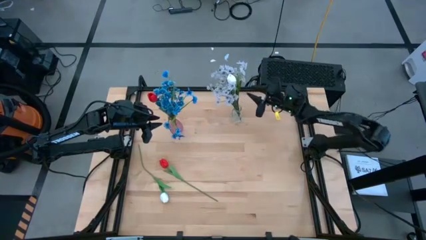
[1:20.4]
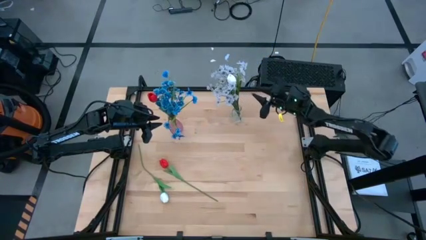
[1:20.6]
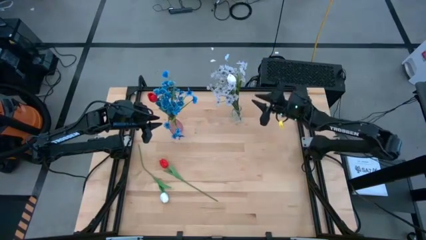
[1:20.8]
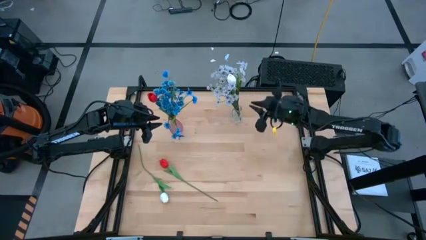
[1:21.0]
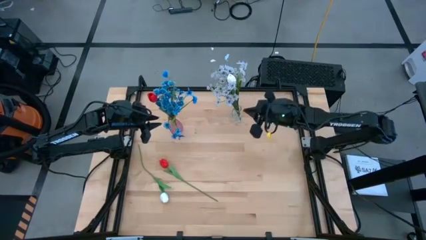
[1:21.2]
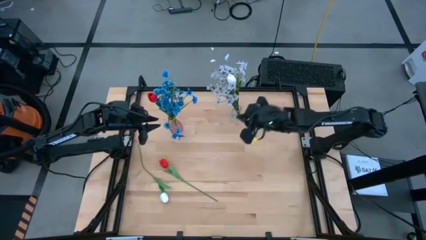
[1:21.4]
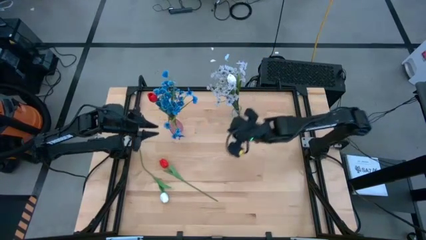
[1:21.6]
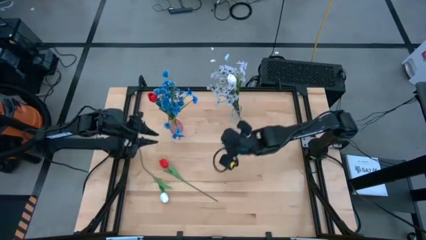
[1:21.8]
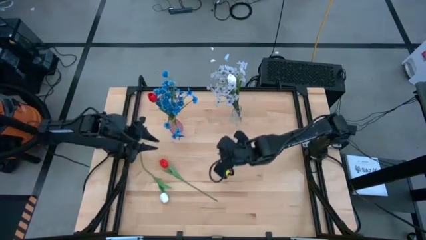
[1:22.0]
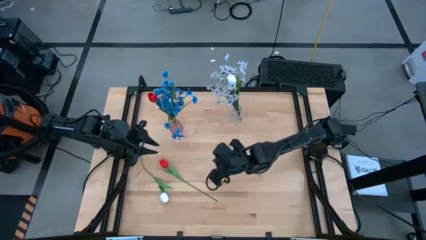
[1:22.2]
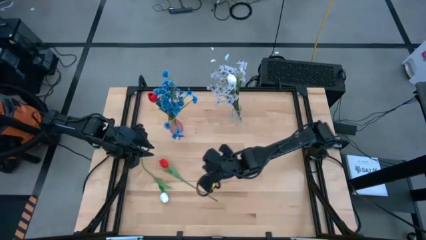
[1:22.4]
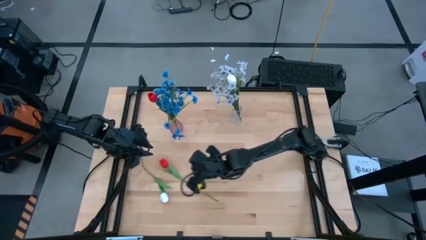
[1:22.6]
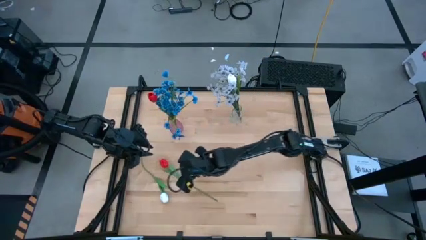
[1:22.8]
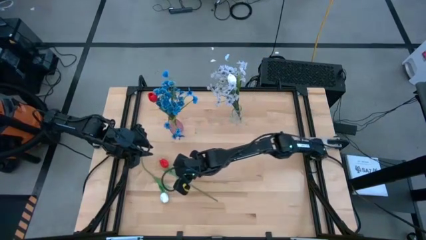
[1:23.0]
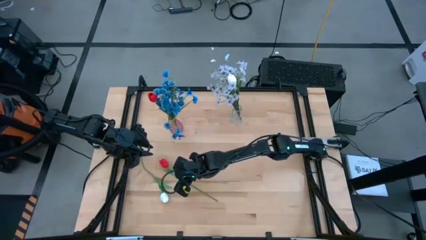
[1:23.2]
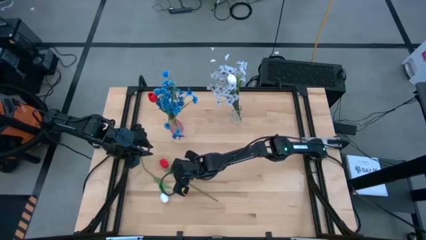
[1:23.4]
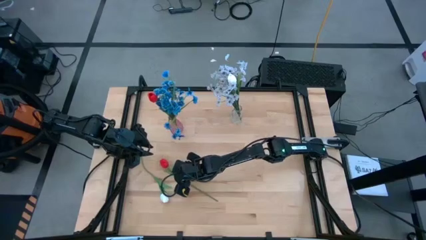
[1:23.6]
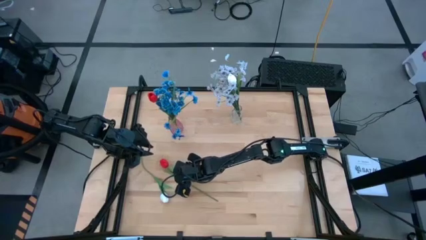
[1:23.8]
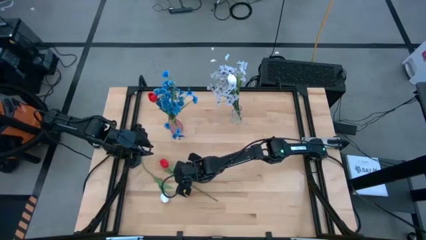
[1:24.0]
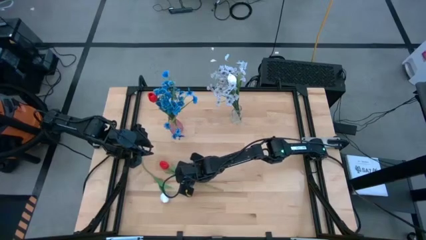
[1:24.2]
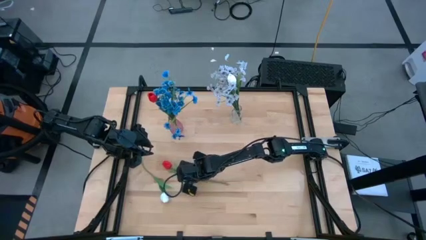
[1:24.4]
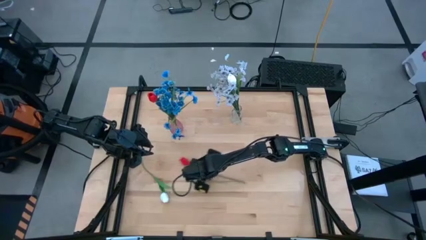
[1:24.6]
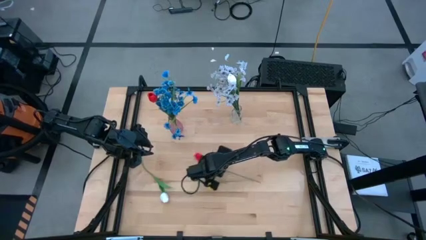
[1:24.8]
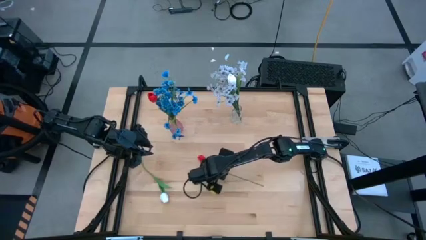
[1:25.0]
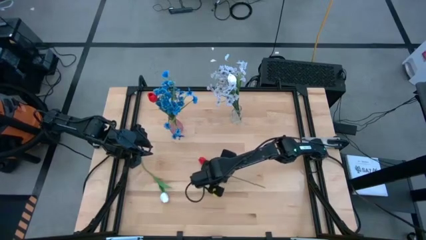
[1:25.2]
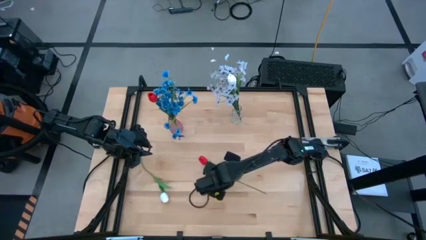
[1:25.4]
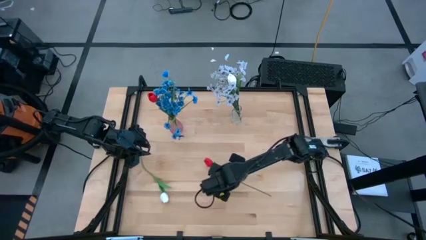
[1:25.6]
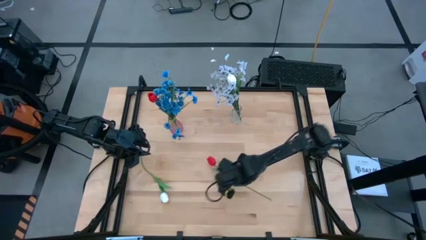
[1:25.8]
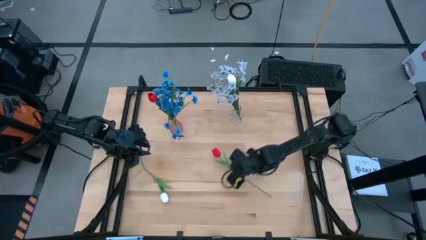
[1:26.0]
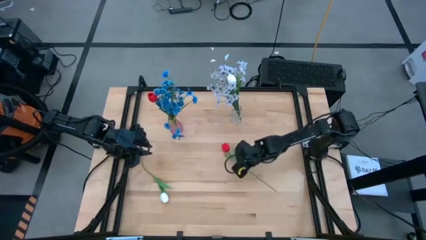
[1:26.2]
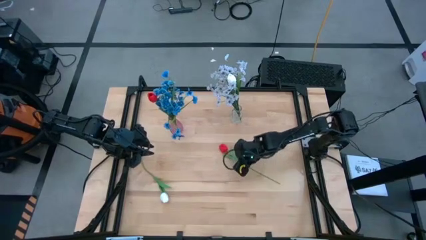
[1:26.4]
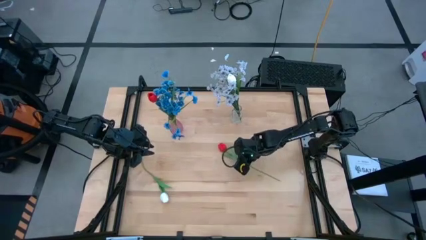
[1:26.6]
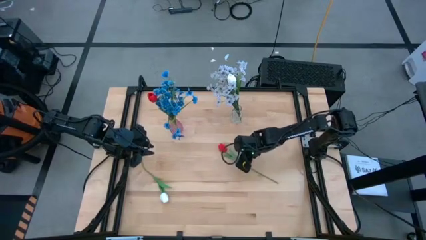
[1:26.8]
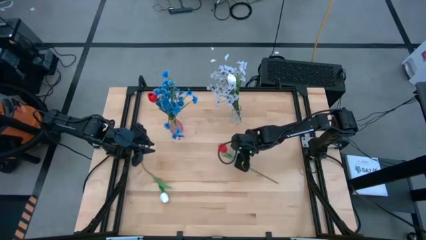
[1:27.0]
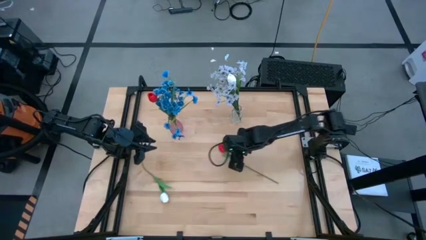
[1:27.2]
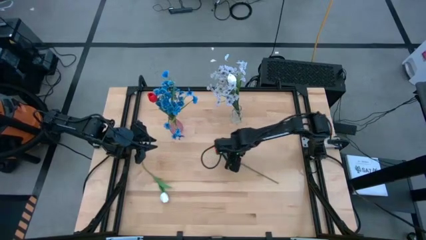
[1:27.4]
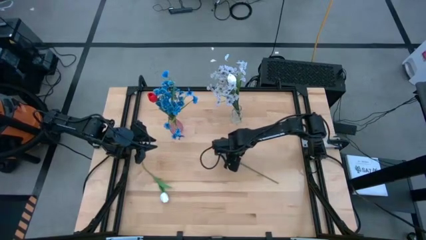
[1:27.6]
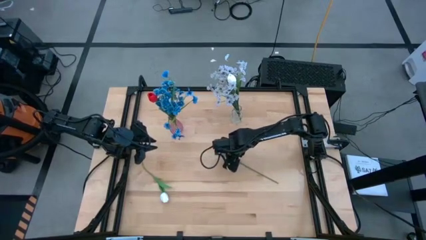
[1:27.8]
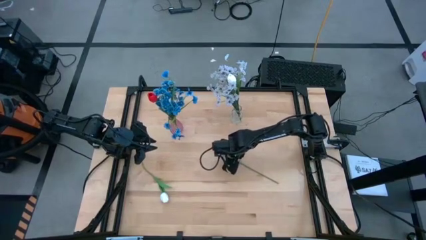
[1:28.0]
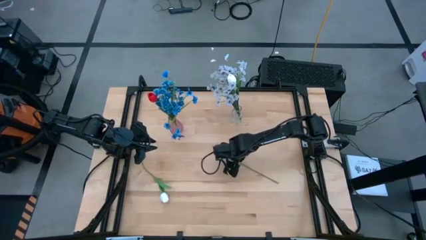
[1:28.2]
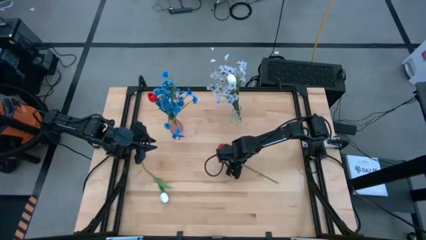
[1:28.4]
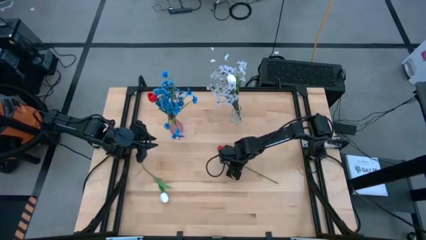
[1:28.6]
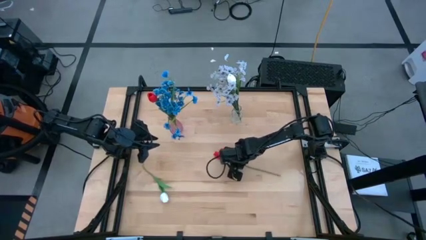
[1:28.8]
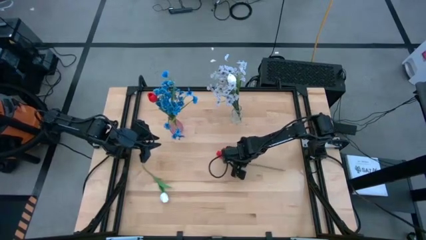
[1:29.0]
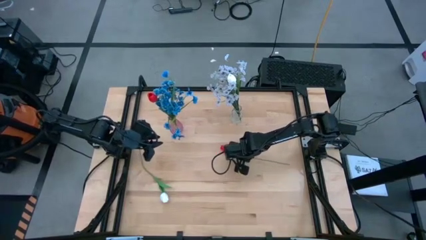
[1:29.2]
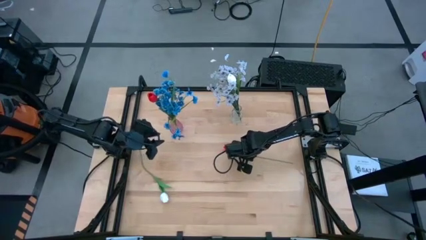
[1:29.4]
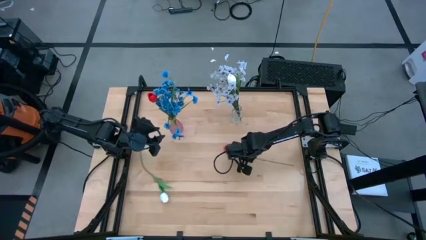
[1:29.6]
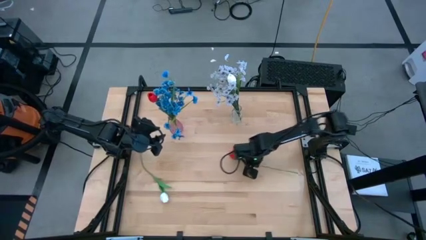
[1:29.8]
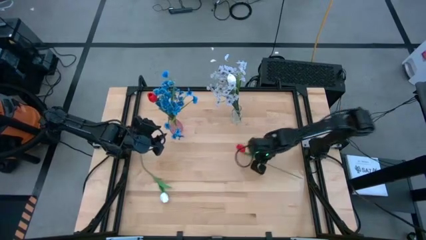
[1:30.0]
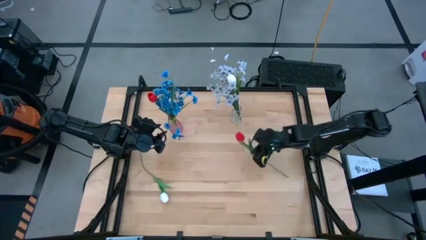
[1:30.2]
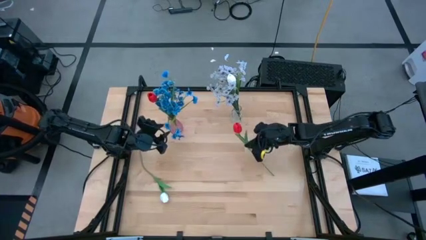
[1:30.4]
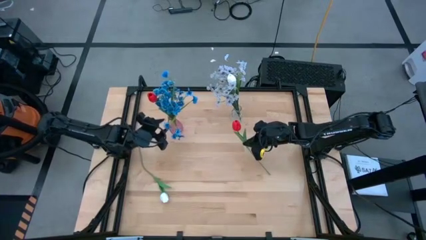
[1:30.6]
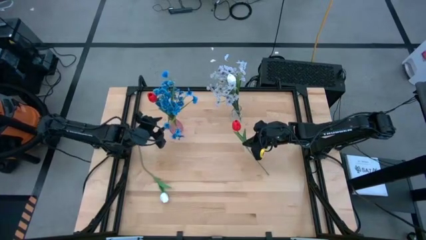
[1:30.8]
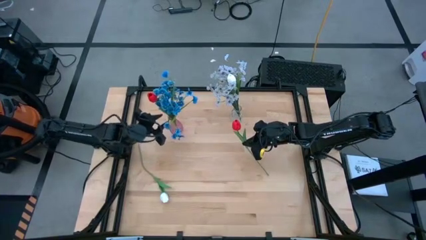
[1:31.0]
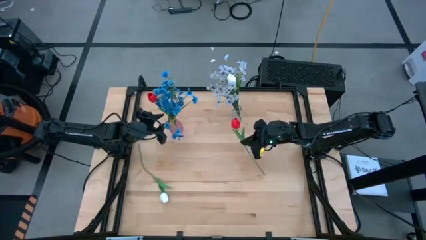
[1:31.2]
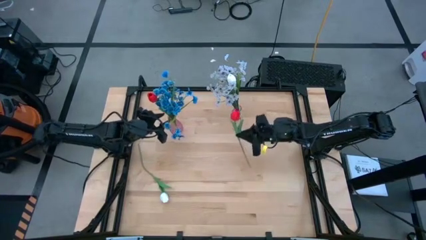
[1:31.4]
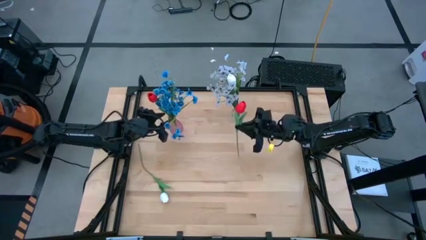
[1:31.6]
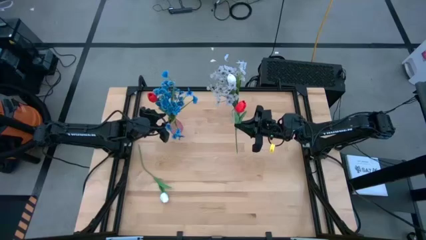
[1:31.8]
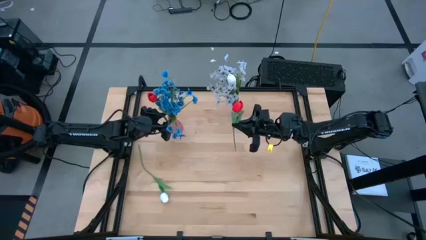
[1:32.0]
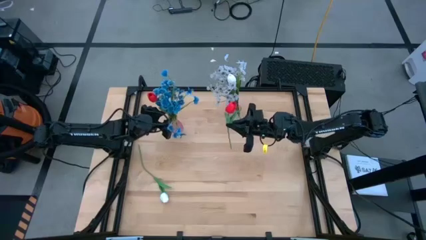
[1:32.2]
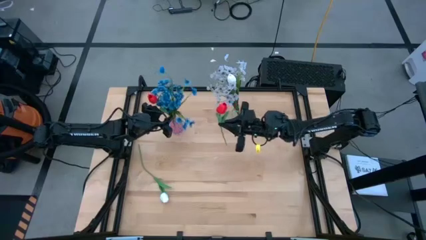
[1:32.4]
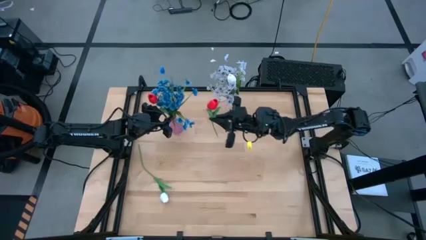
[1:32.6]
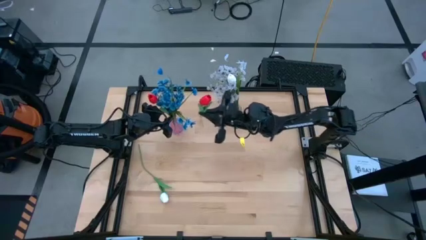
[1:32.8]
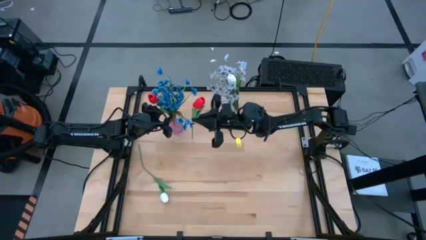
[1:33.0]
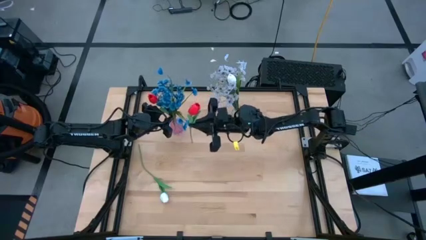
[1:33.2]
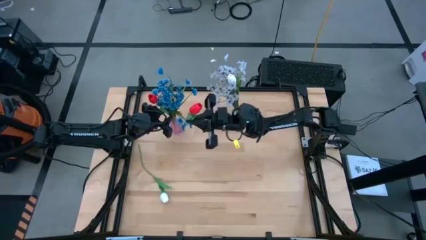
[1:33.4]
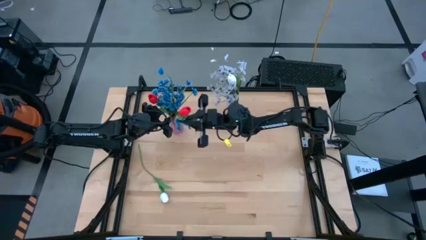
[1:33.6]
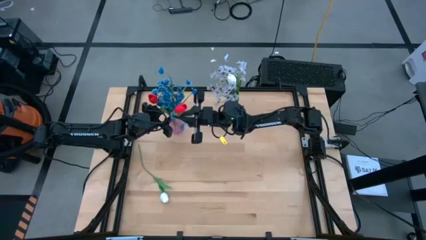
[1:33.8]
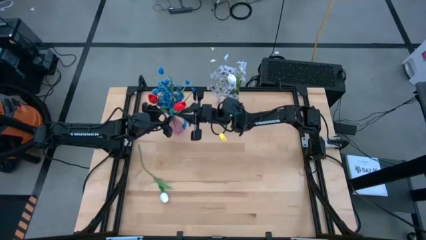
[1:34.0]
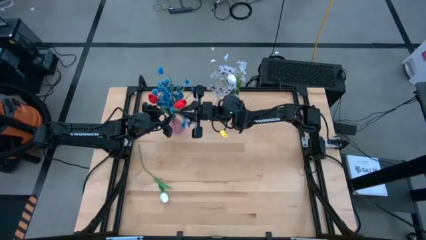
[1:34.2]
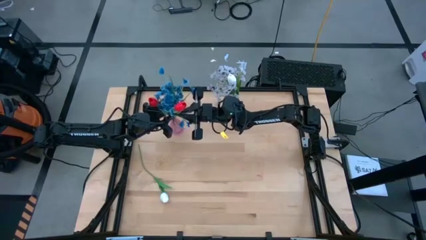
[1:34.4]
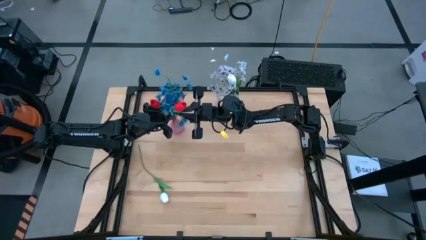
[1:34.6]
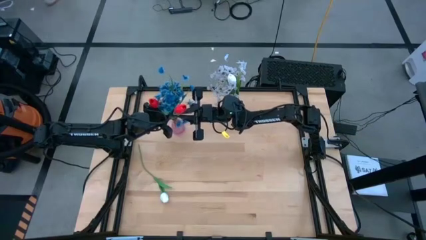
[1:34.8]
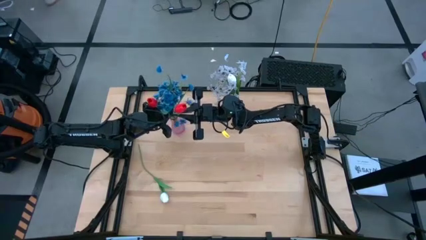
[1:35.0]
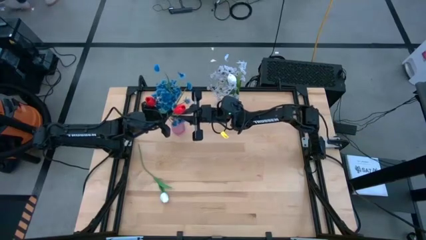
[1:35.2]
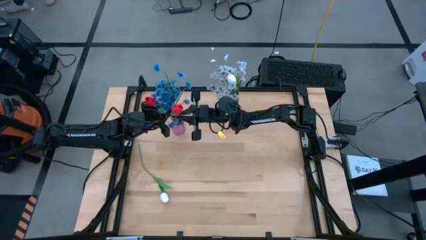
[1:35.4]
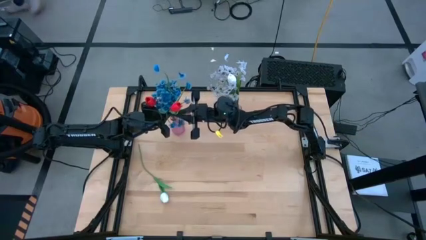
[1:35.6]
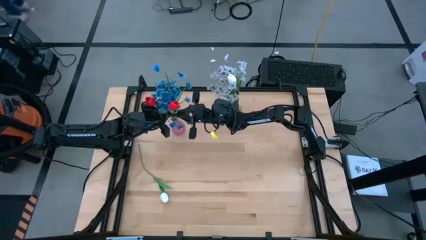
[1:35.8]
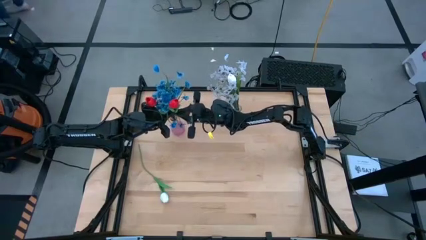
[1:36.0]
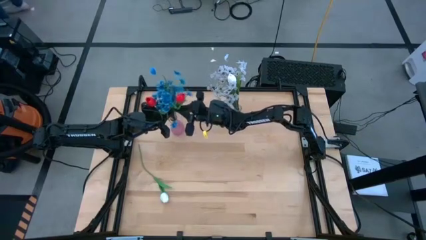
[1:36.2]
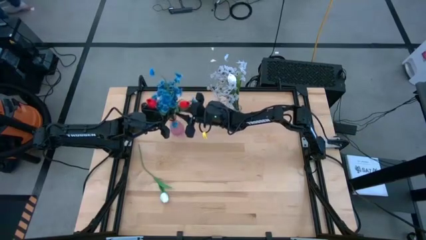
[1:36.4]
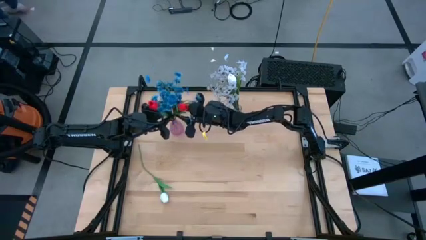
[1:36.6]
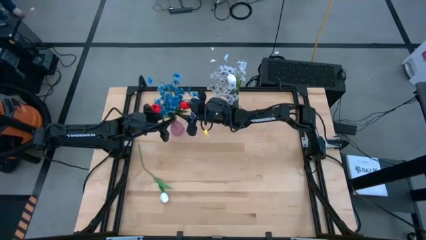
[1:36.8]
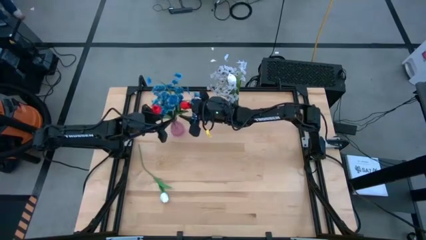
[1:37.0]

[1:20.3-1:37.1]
Task: Sort flowers into vase by color
Put the red tulip into the pink vase
